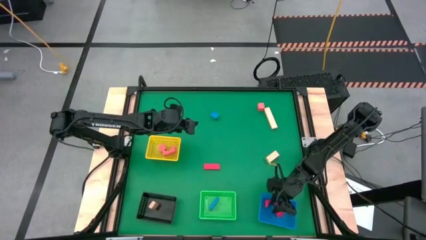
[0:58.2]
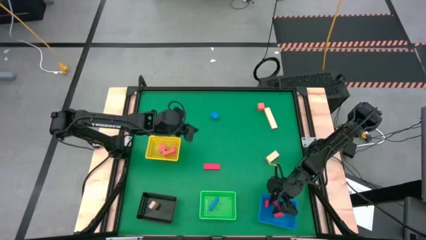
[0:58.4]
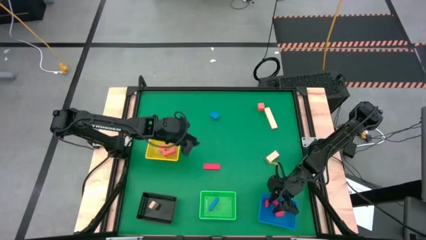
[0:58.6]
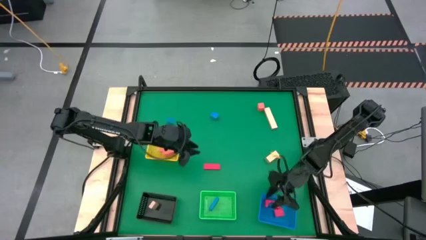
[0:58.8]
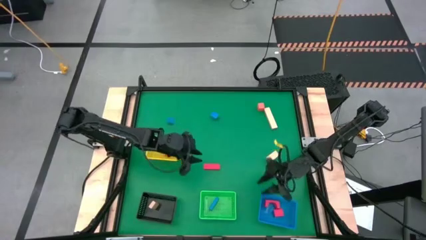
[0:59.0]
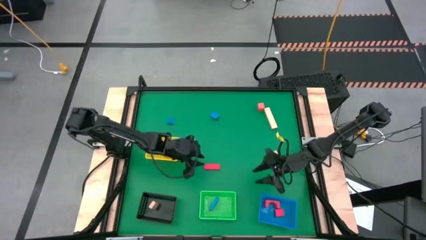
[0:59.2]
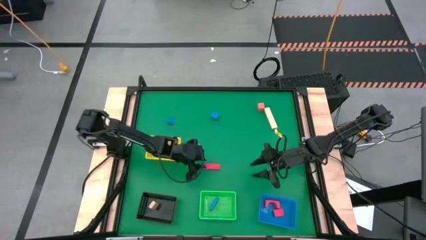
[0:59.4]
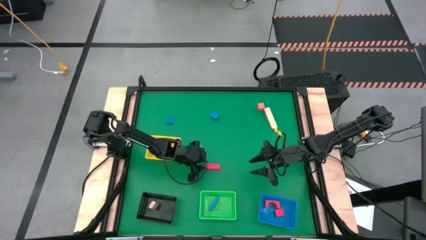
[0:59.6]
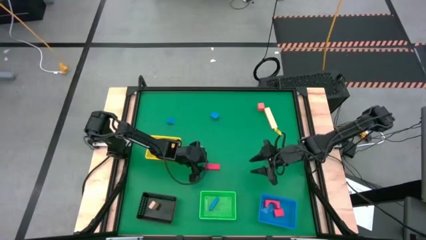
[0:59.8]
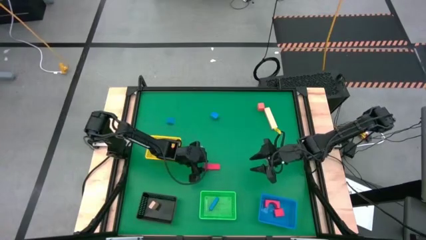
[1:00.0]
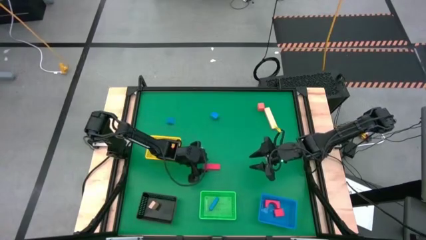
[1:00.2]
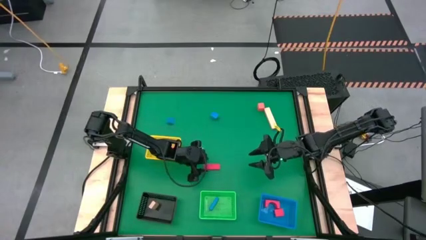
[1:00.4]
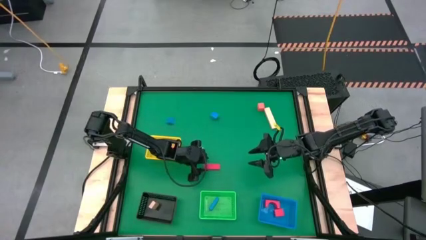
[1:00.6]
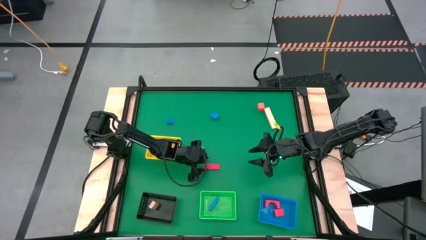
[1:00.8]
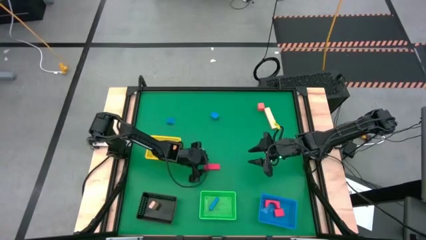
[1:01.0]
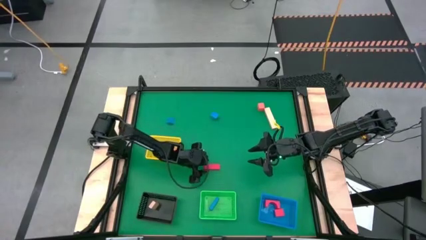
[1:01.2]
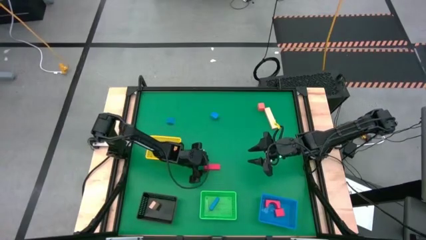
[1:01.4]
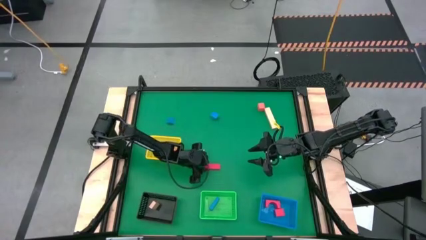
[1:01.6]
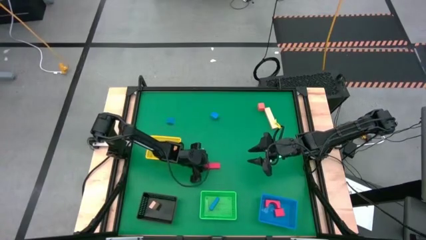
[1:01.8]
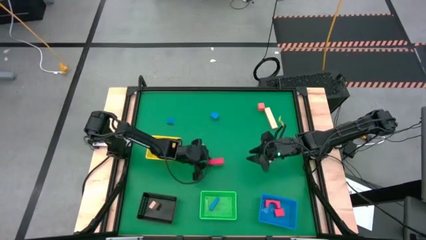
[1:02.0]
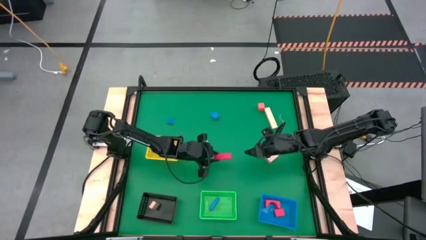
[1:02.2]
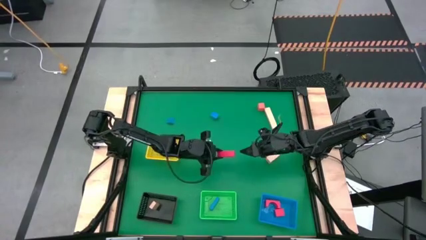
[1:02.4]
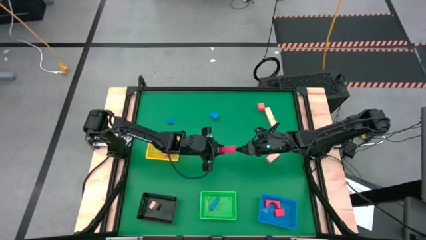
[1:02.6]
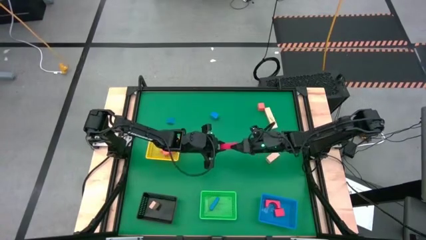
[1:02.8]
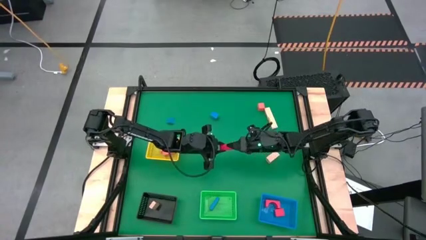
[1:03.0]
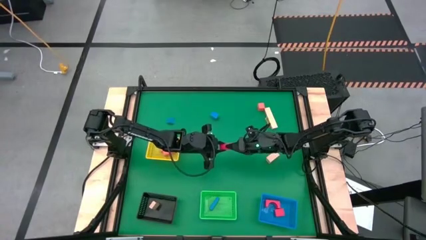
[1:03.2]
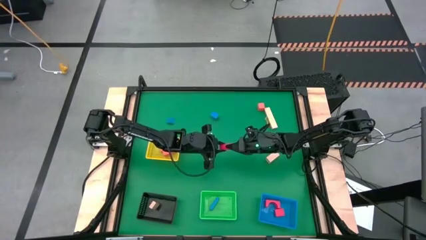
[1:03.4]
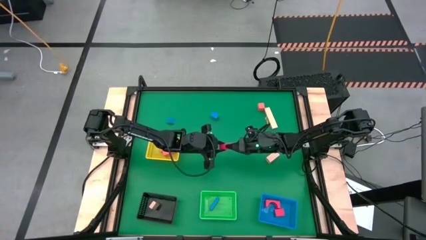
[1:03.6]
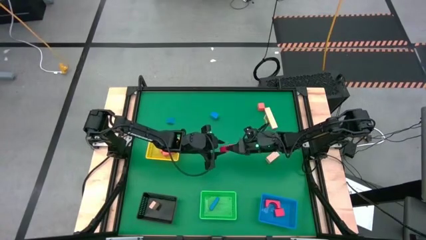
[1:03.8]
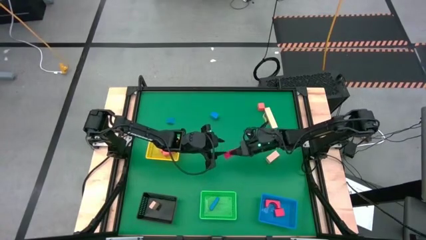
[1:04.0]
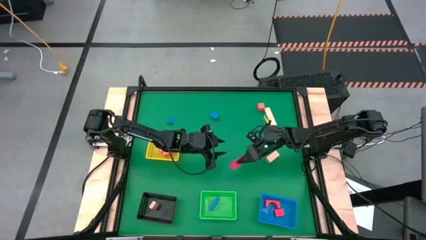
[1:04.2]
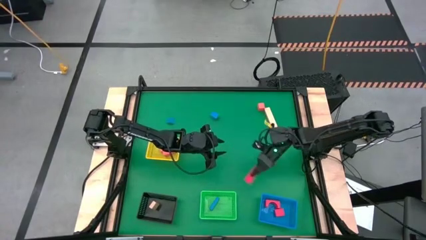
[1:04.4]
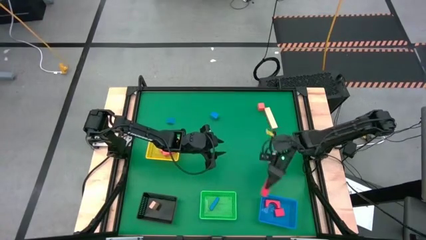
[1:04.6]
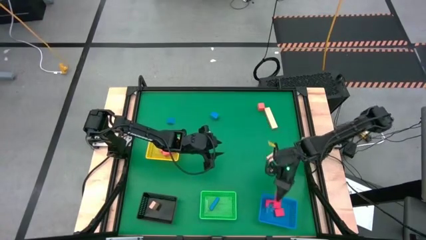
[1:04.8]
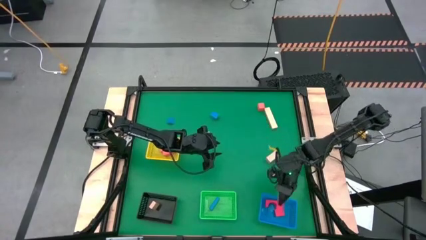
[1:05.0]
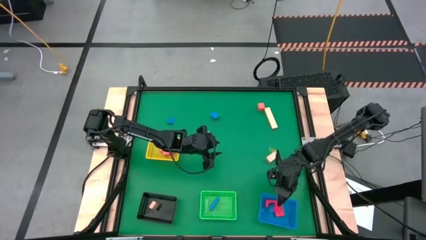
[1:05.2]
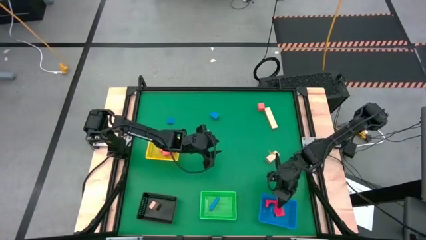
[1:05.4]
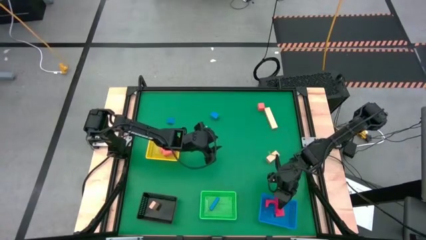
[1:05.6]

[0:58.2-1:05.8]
Task: Sort & place blocks by color
Put the red rectangular block into the blue bin

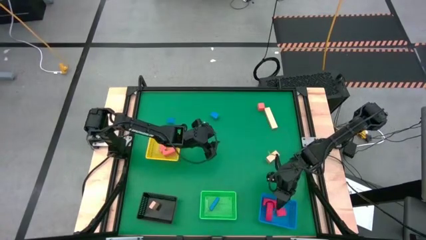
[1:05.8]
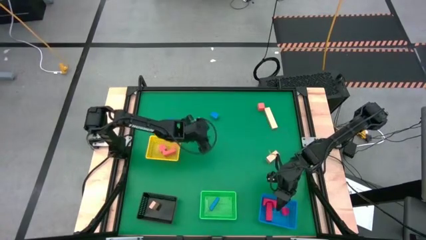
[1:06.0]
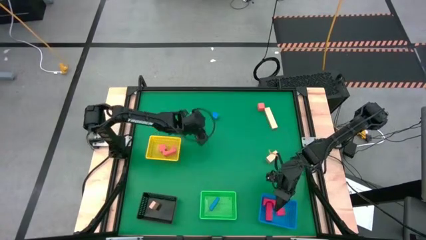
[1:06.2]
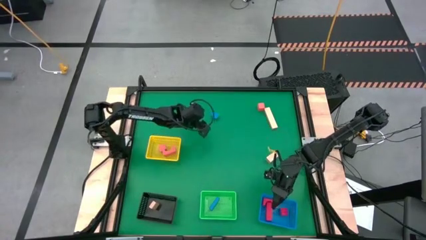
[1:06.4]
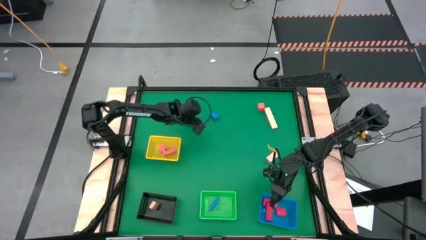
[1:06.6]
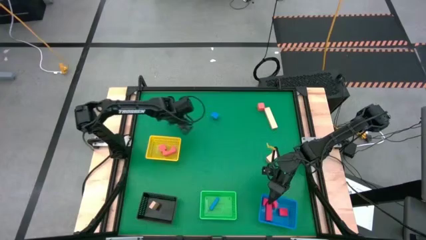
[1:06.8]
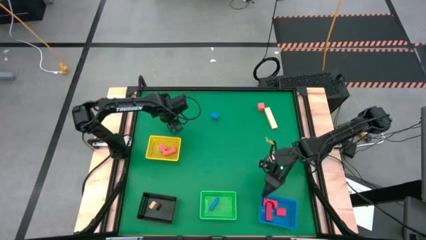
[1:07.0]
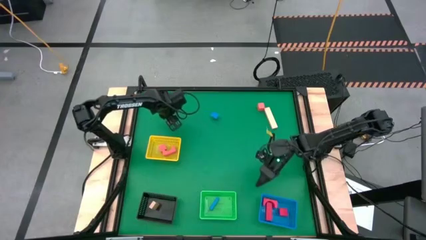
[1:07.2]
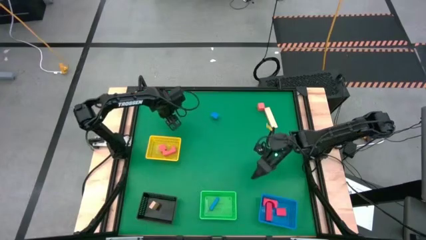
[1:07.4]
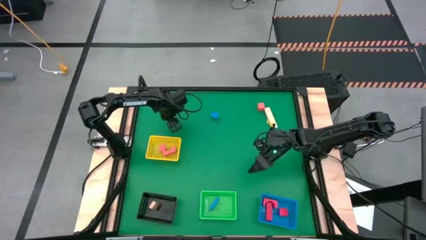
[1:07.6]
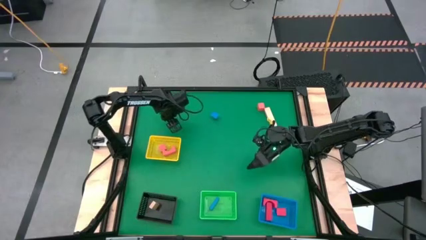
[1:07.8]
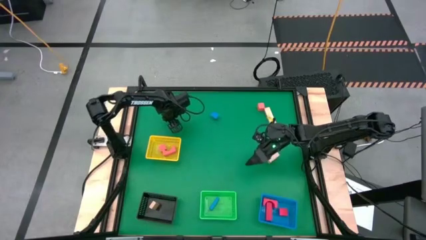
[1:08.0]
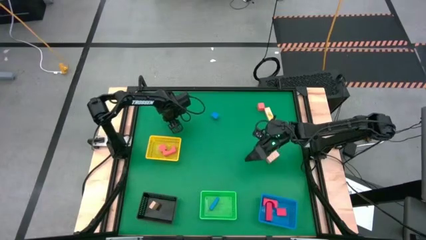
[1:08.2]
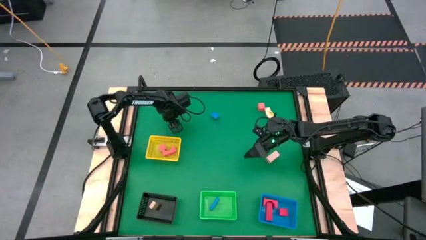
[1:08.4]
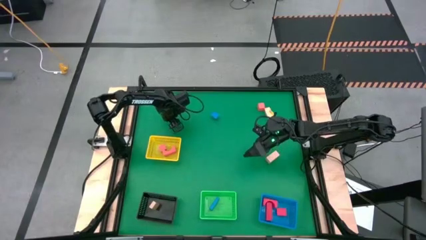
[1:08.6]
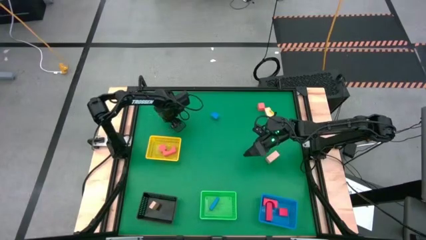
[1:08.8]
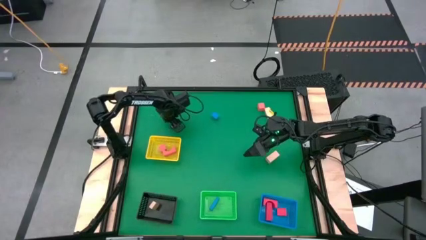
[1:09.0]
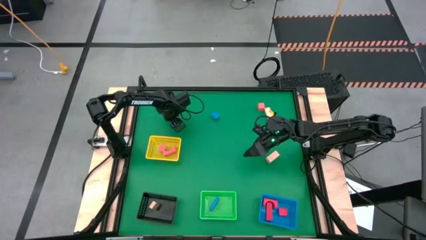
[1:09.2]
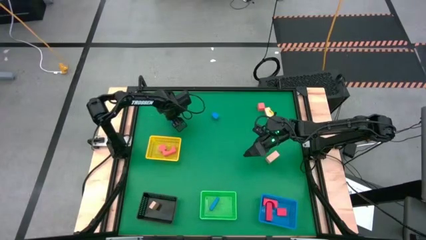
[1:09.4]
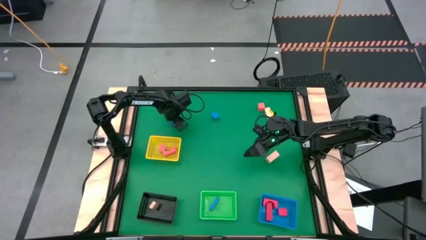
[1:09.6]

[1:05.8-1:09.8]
Put the blue half-circle block into the green bin

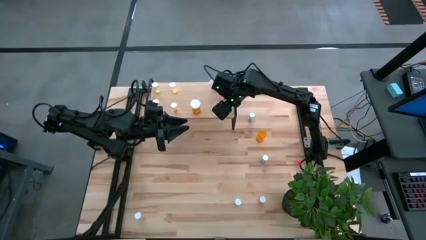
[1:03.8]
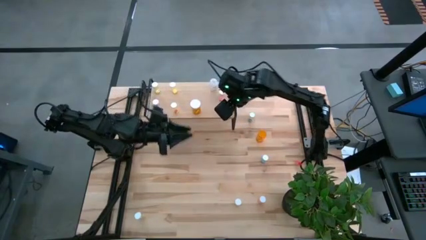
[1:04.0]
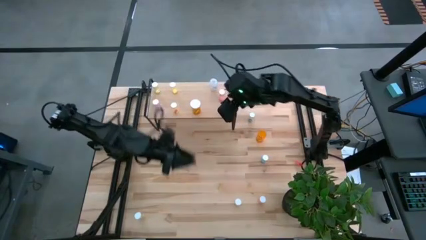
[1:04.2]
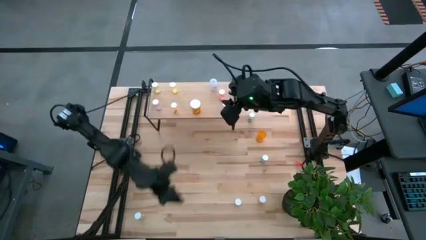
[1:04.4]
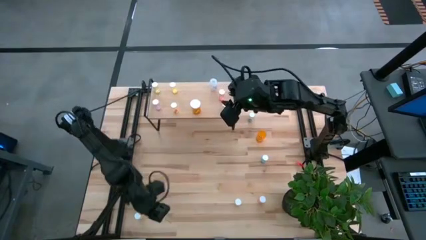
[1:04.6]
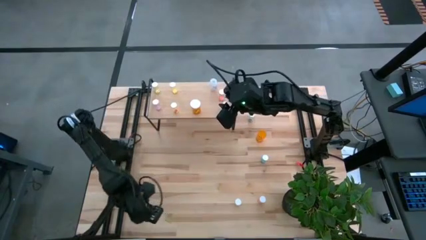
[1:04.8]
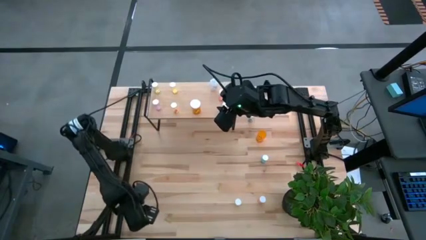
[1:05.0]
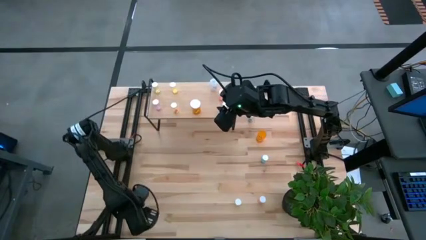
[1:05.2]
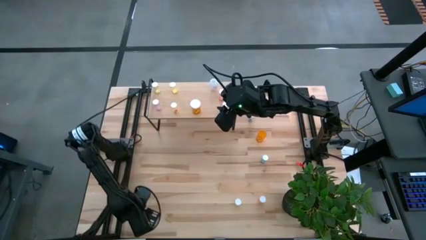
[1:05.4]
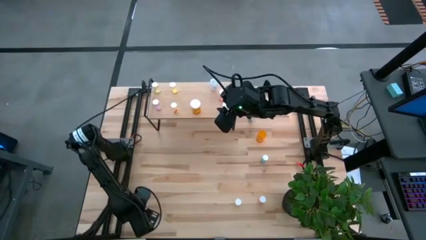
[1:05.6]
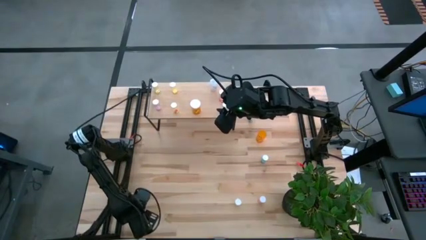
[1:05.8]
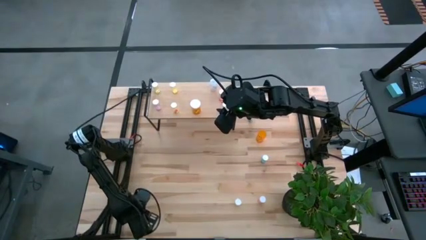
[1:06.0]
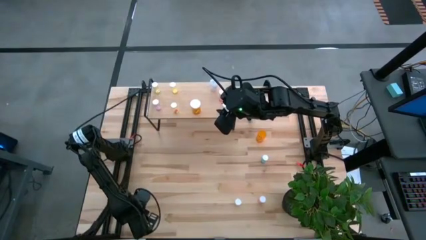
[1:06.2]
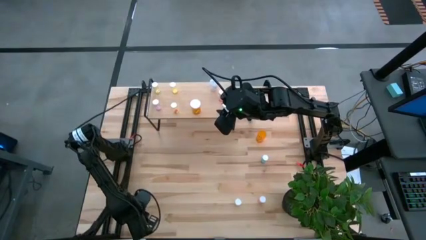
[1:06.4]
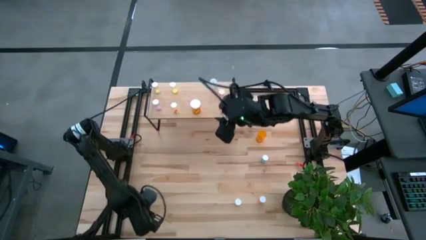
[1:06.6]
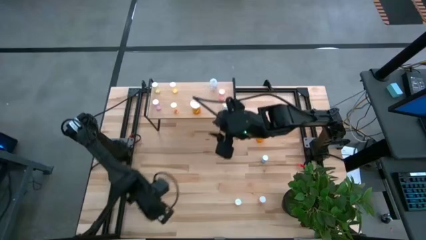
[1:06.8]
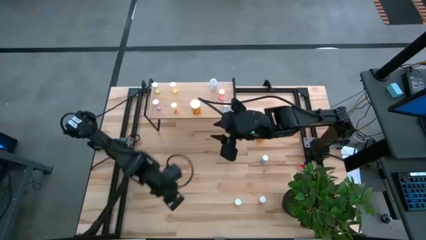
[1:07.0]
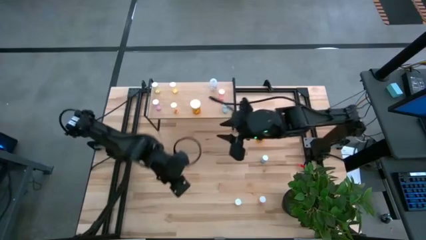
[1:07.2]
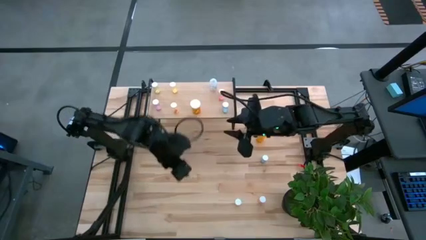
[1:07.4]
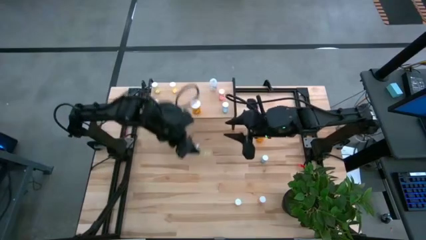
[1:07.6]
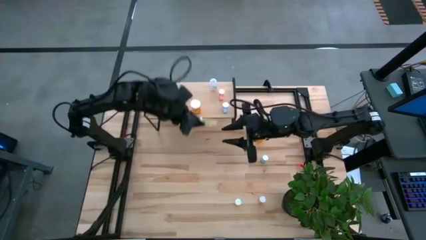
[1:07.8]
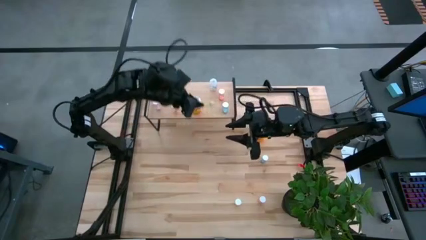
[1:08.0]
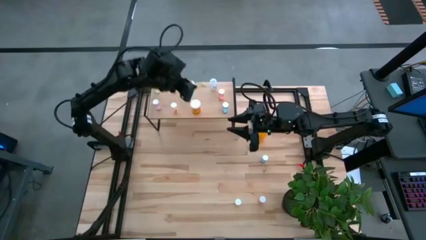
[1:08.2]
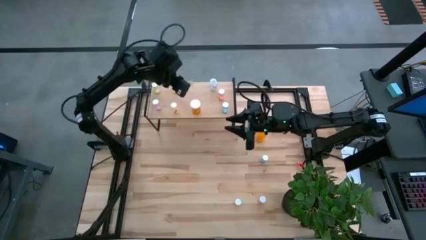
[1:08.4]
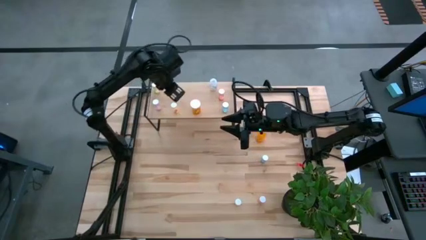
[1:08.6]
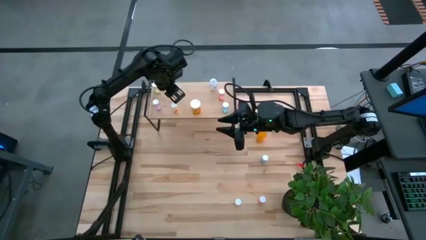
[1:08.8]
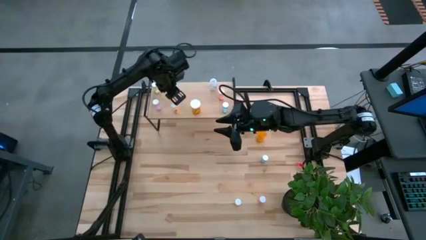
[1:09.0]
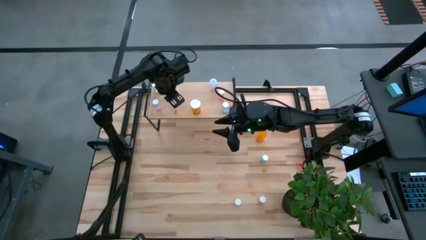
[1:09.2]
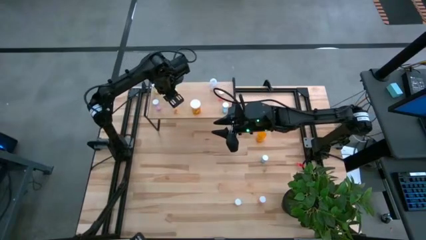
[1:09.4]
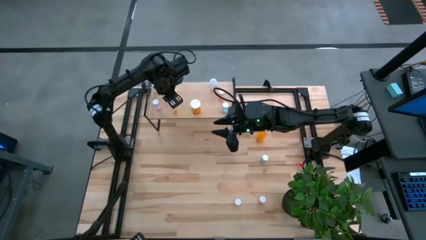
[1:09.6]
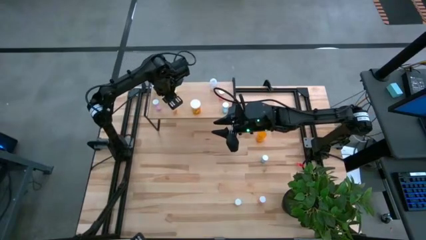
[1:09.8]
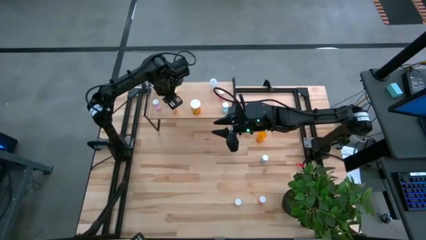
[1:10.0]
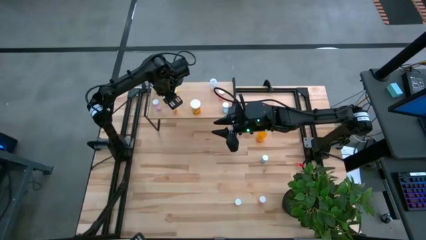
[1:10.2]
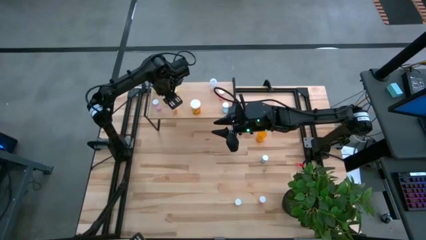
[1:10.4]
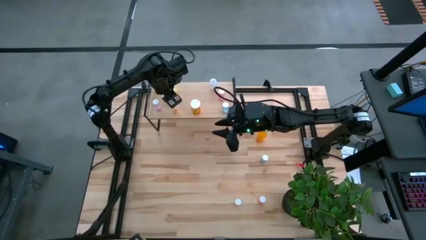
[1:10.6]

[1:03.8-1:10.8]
Task: Pick and place medicine bottles onto shelf by color
Put the yellow pill bottle on the shelf
